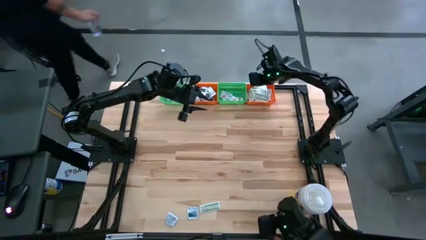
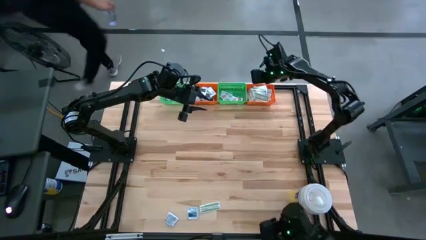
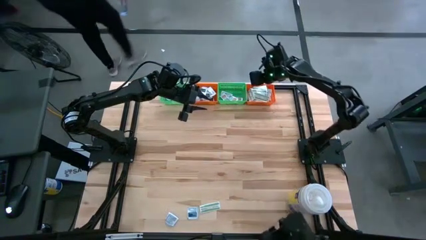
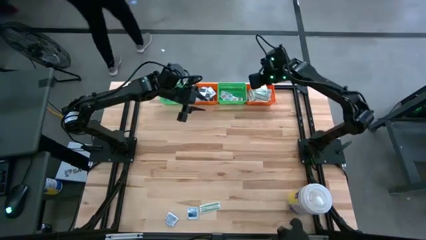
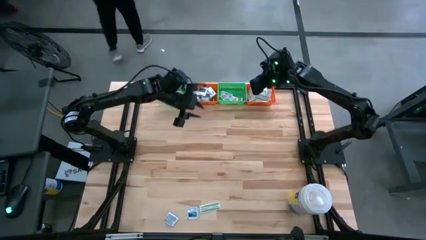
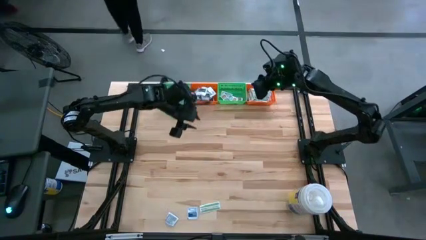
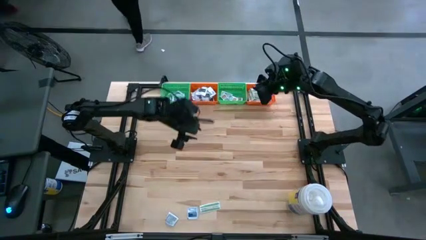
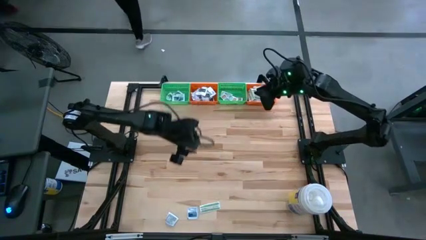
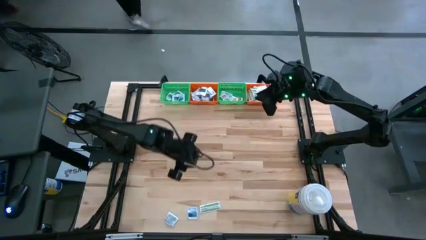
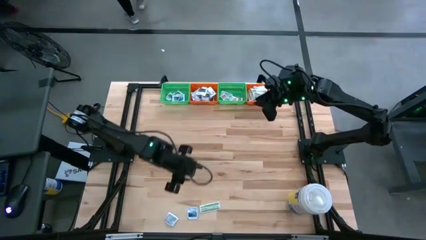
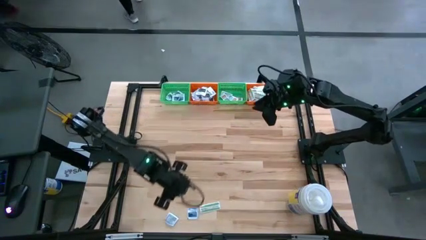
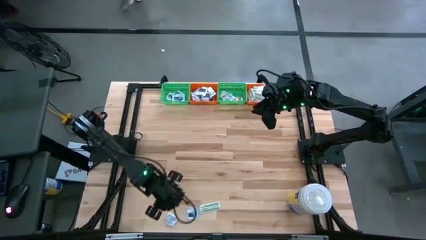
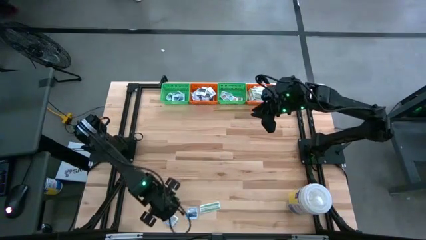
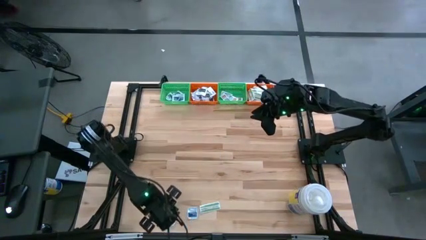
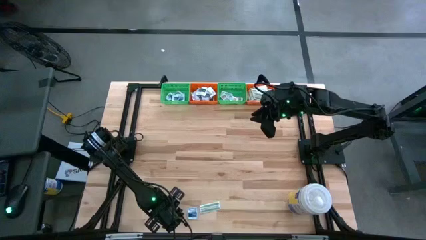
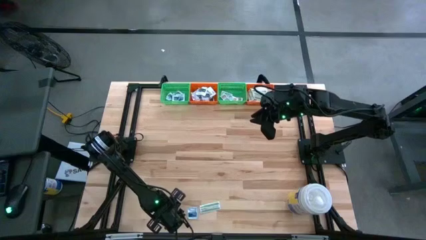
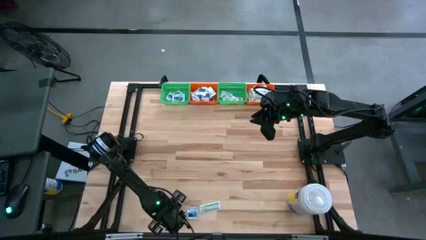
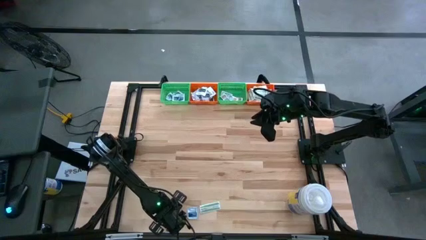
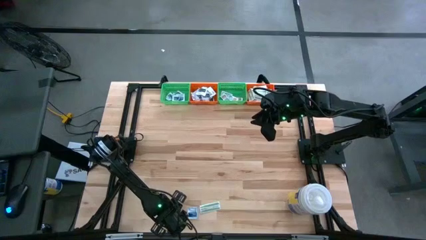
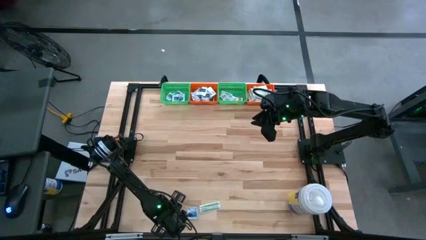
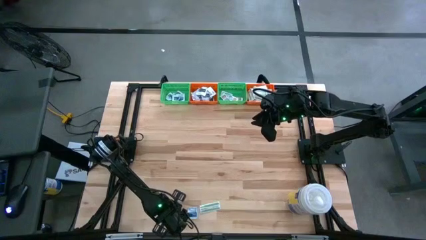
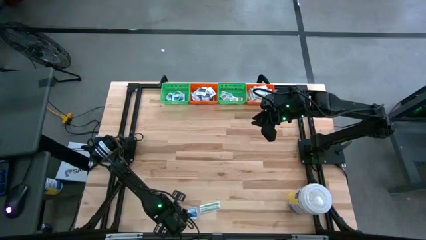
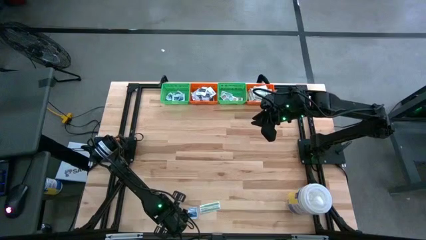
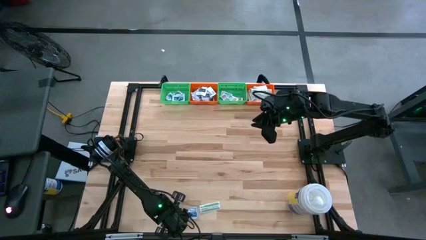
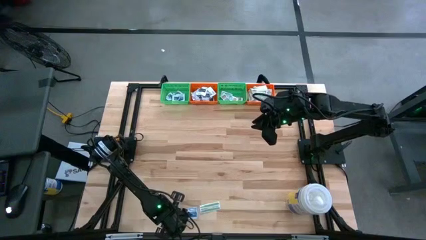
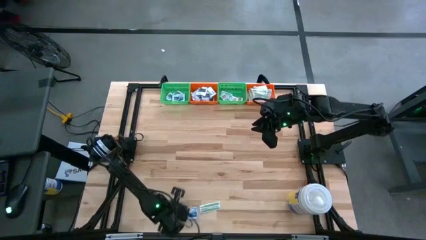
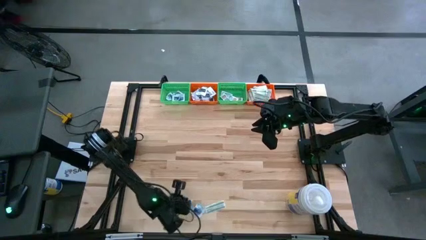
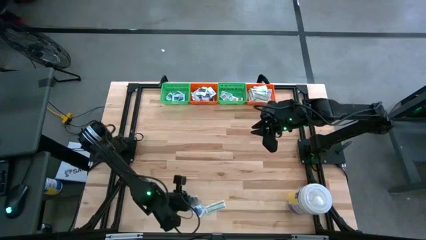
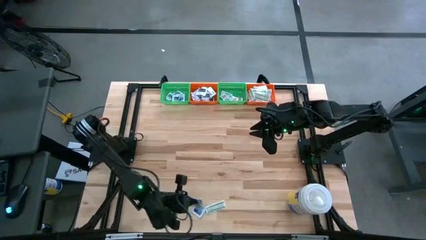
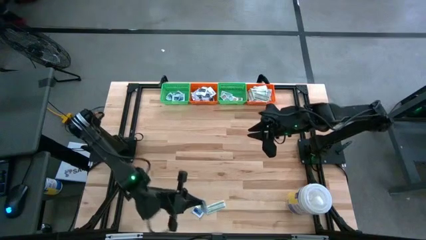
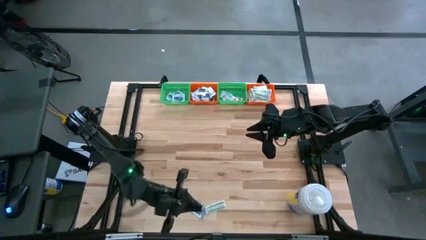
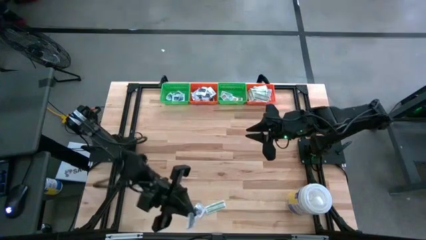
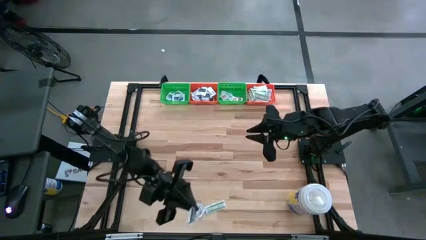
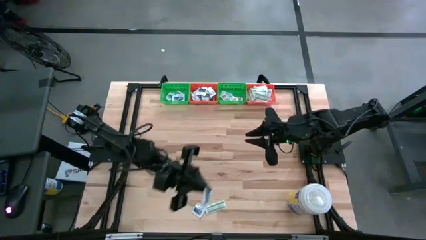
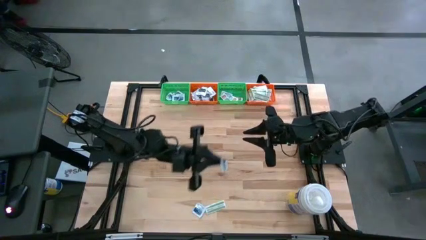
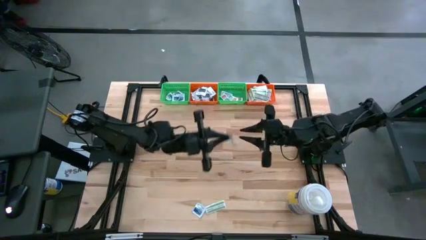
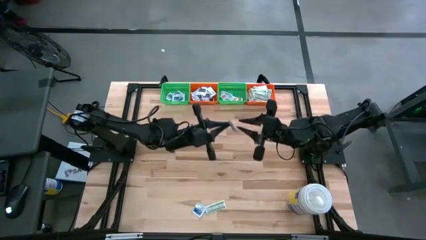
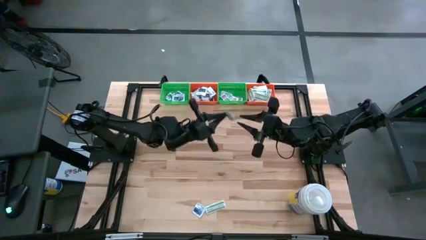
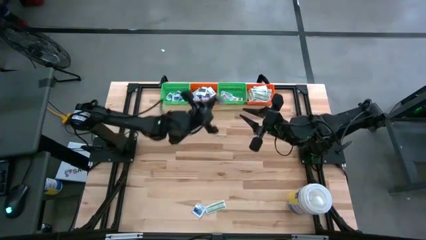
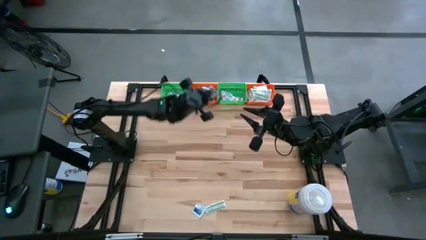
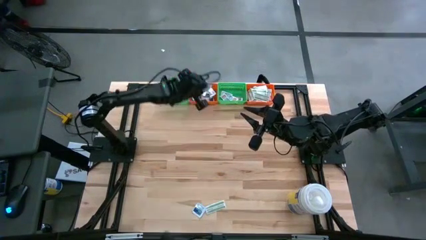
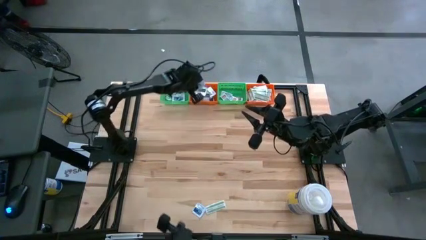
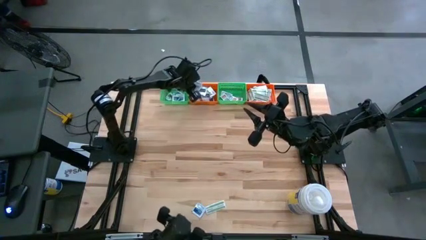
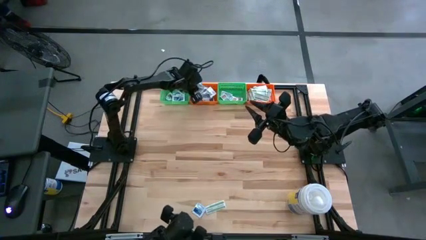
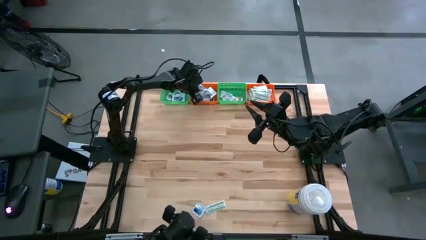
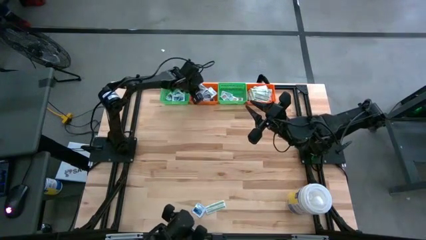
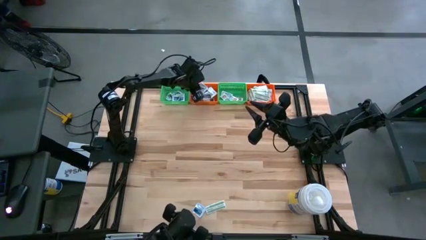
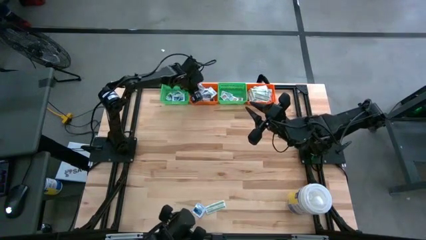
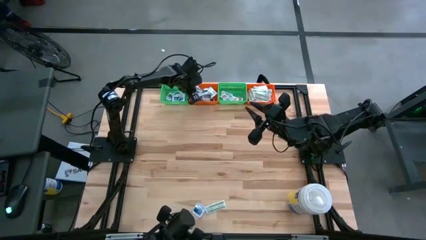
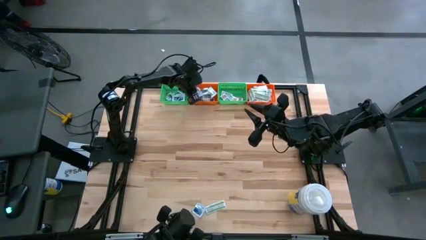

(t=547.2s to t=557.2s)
Task: Pick & Place First Aid Supplies
Put the gray towelette pack in the left orange bin

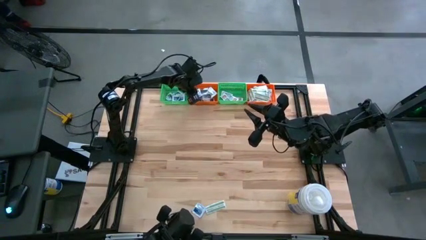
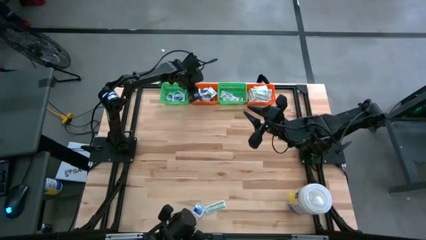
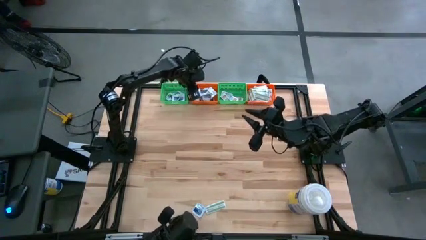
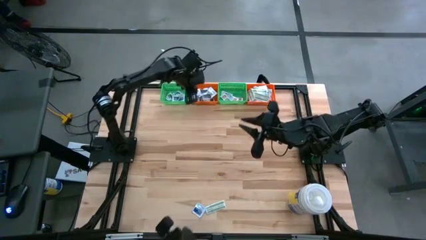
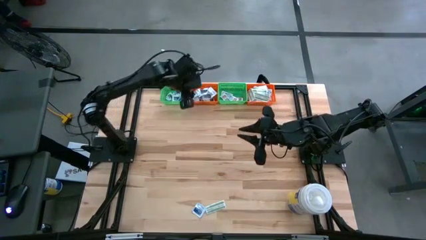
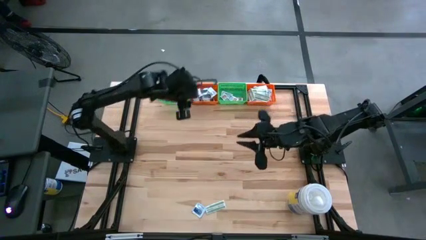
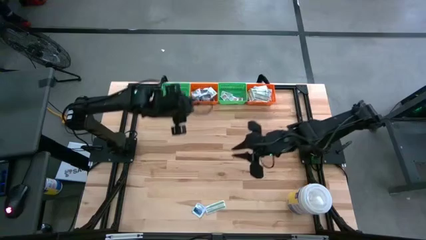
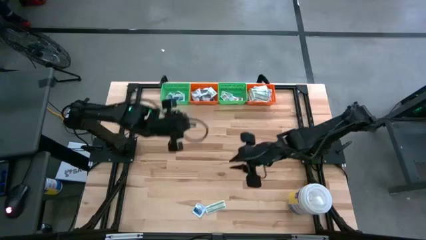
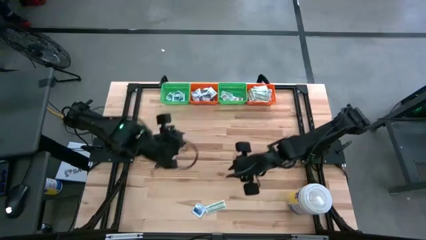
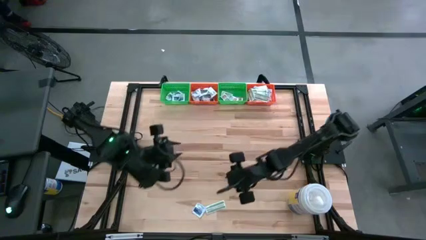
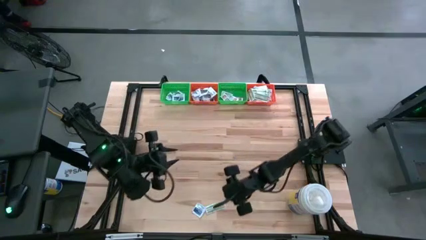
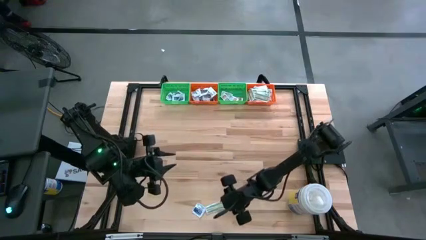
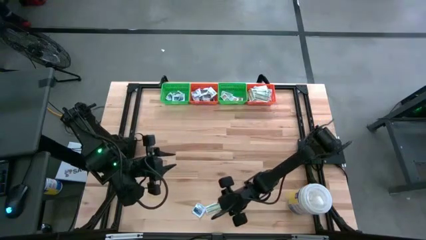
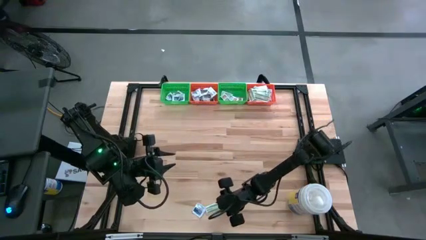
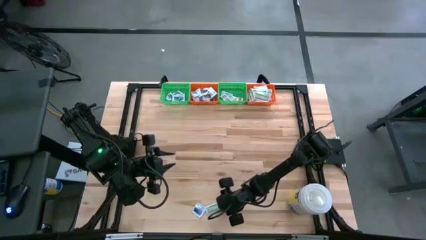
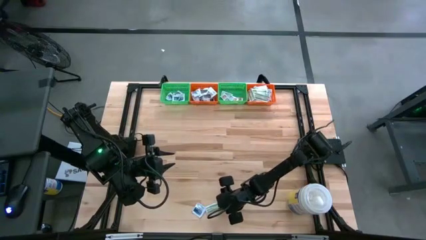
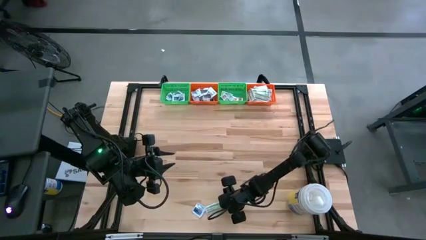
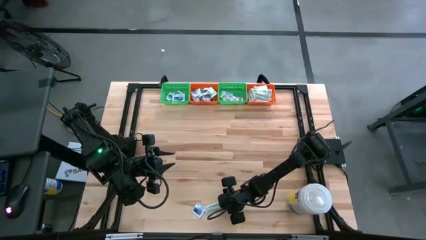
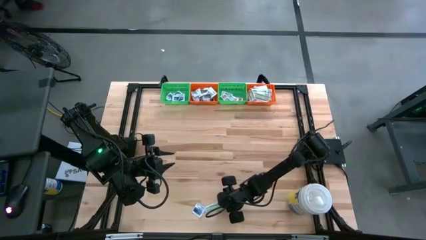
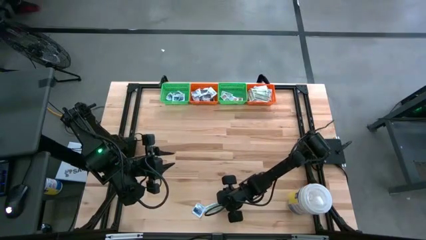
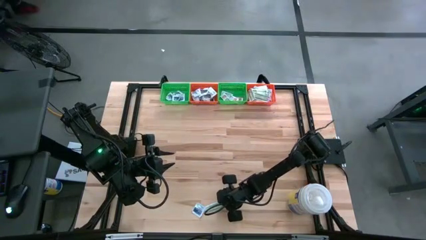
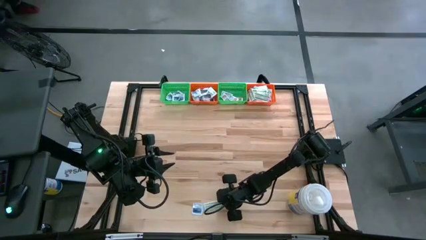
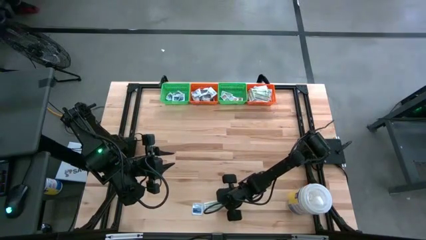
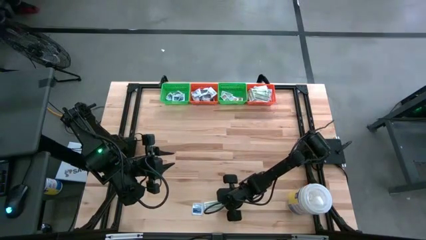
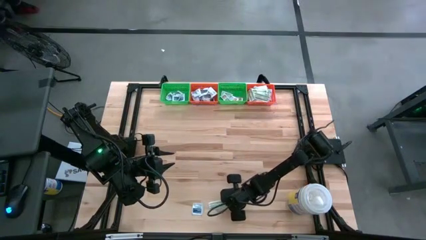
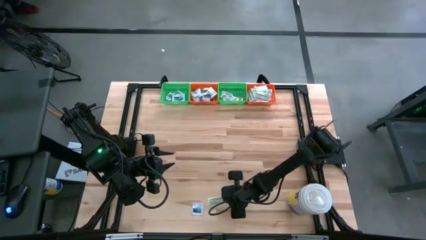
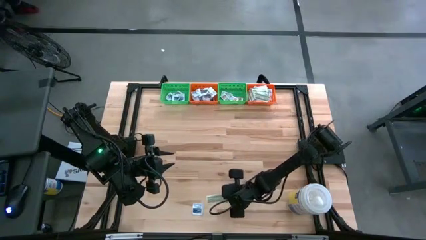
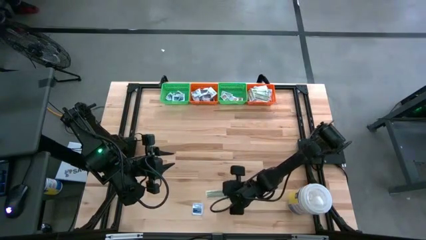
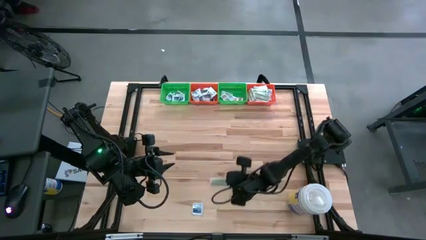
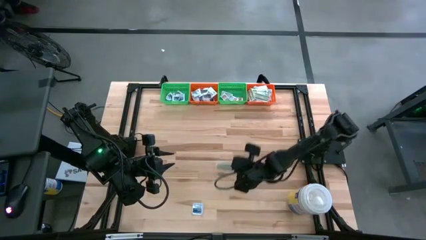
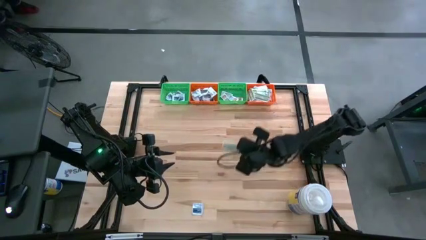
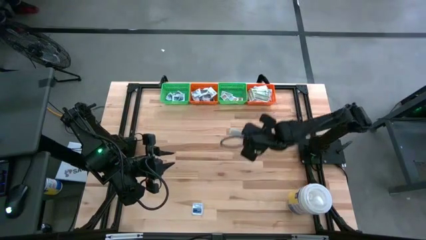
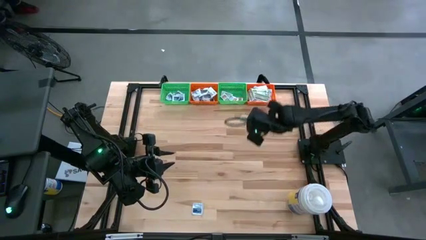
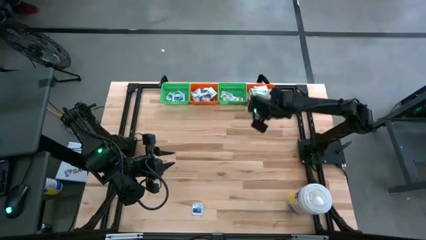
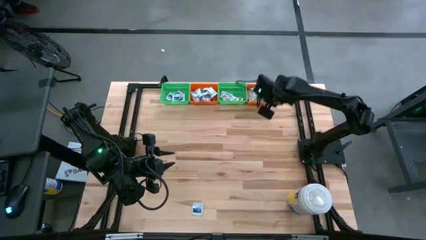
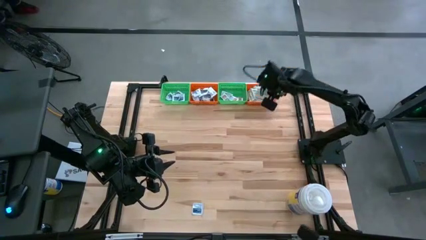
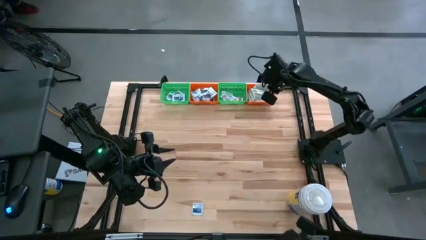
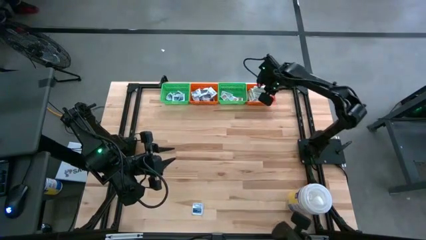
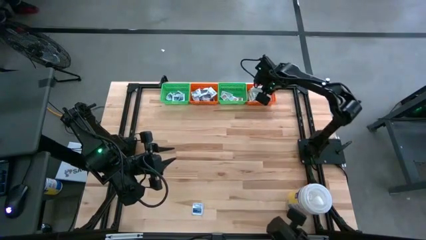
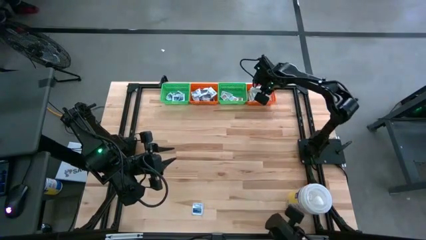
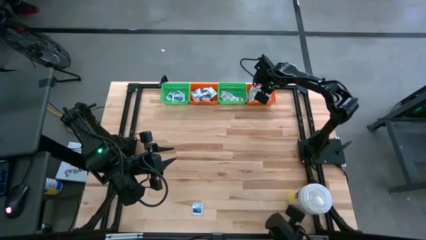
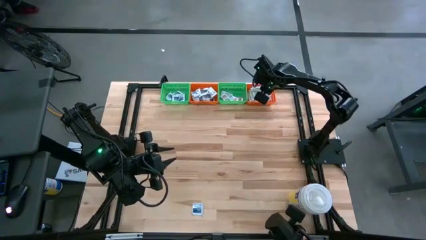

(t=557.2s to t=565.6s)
Put the green bandage pack in the right orange bin
